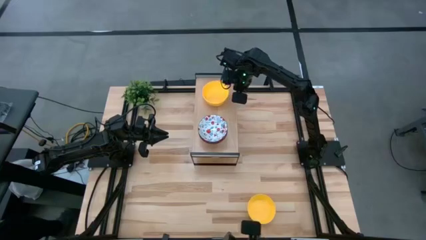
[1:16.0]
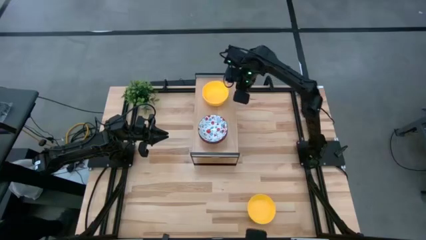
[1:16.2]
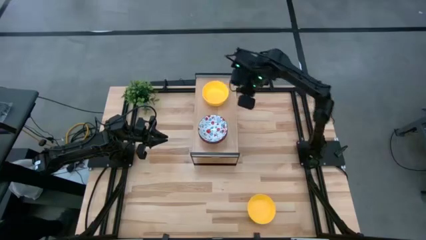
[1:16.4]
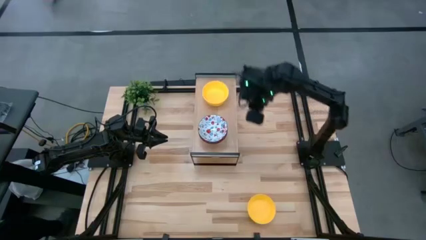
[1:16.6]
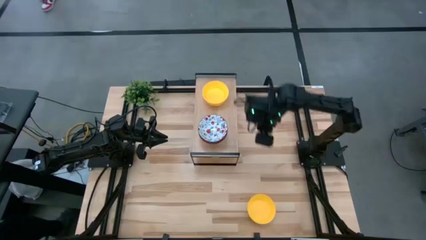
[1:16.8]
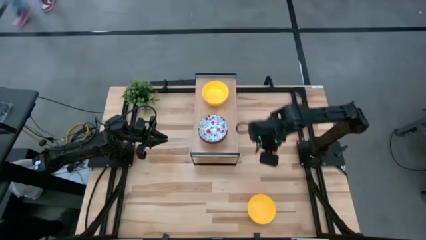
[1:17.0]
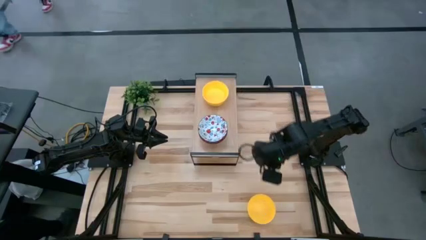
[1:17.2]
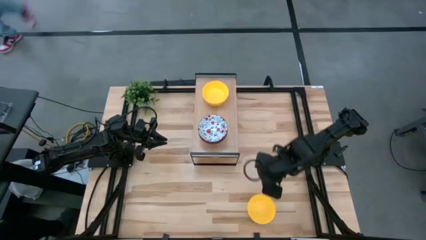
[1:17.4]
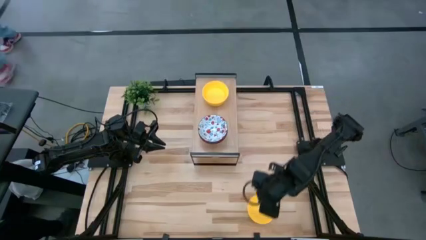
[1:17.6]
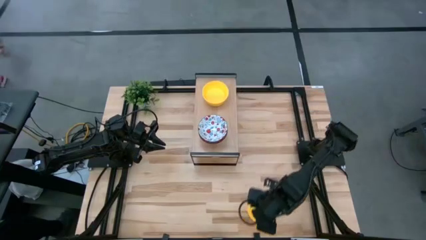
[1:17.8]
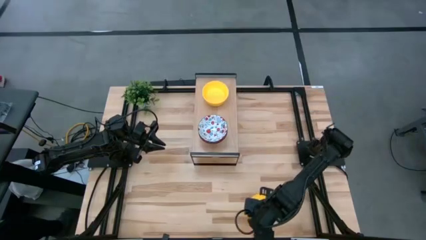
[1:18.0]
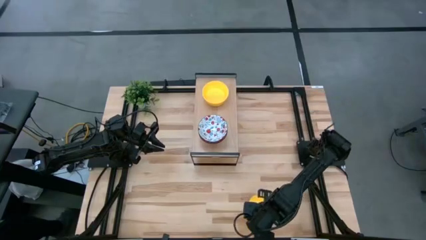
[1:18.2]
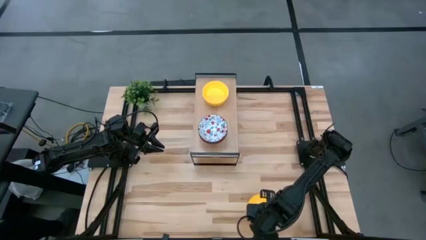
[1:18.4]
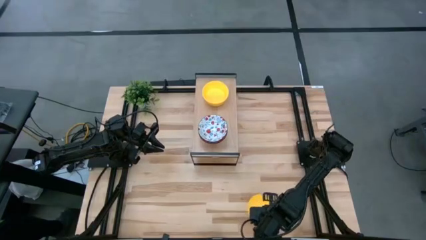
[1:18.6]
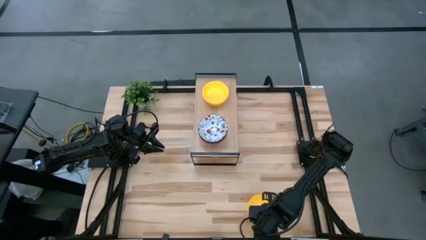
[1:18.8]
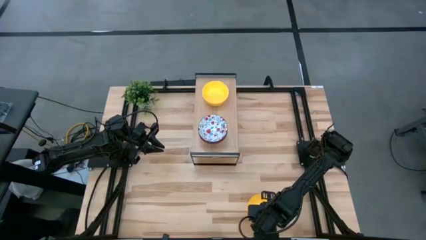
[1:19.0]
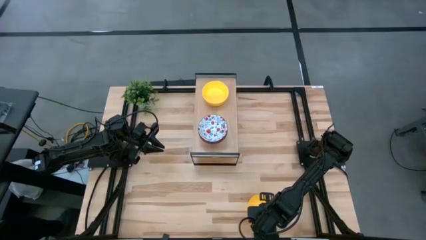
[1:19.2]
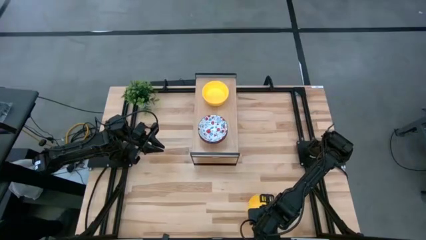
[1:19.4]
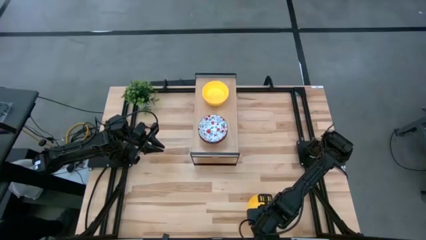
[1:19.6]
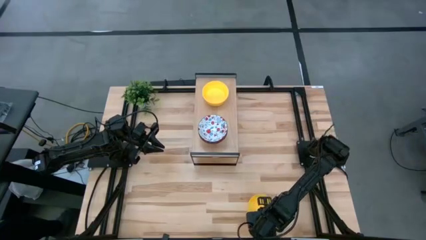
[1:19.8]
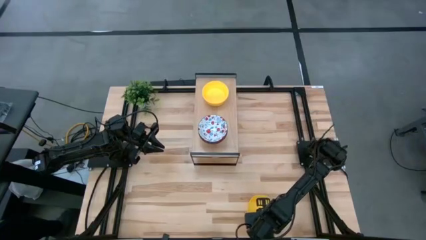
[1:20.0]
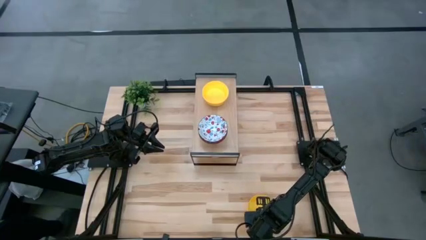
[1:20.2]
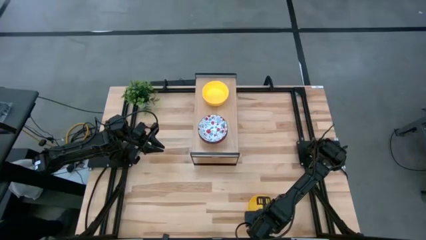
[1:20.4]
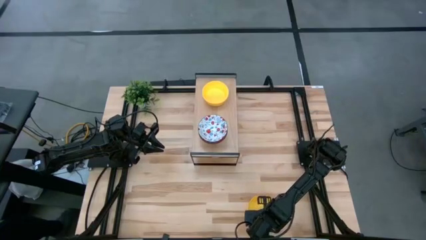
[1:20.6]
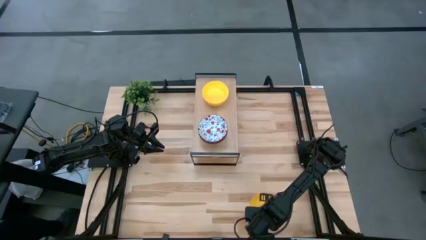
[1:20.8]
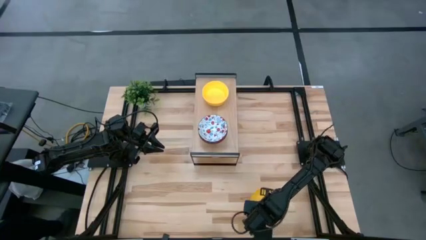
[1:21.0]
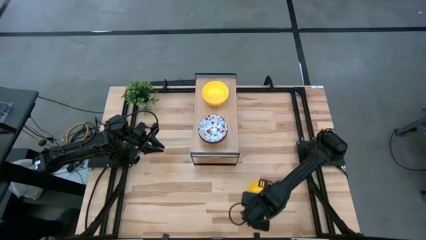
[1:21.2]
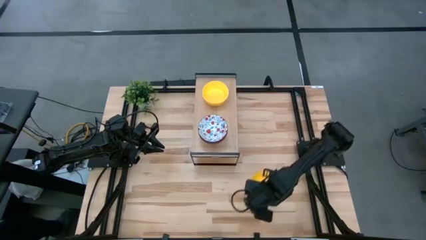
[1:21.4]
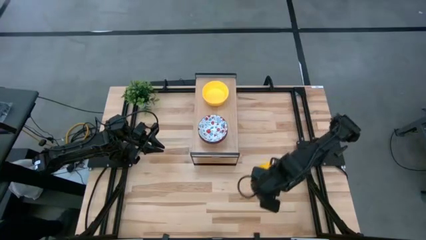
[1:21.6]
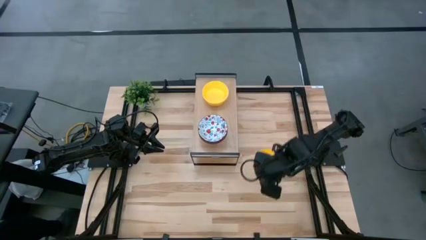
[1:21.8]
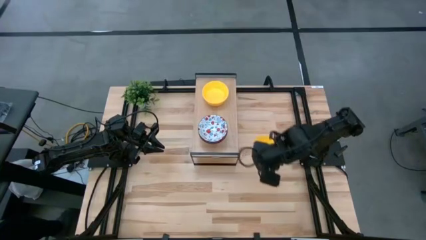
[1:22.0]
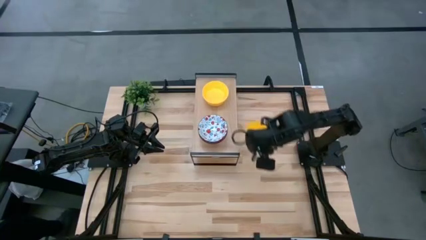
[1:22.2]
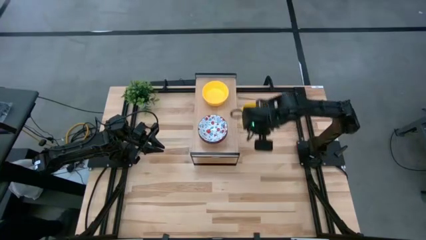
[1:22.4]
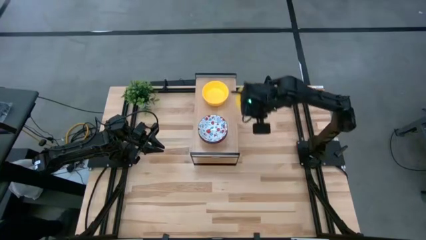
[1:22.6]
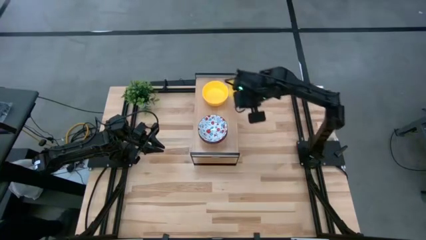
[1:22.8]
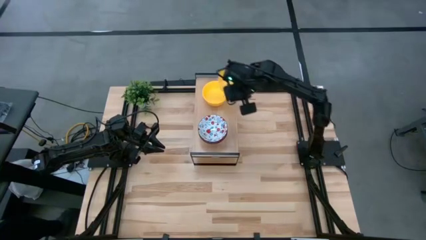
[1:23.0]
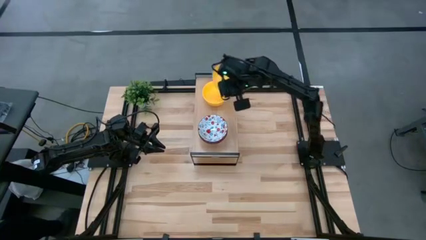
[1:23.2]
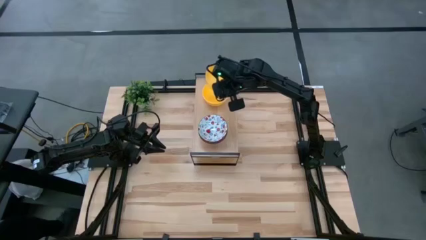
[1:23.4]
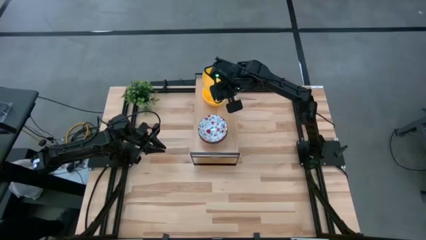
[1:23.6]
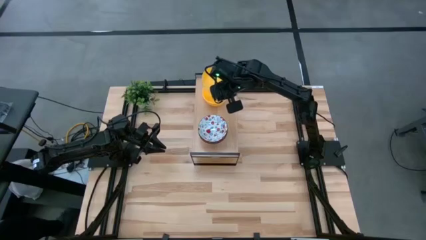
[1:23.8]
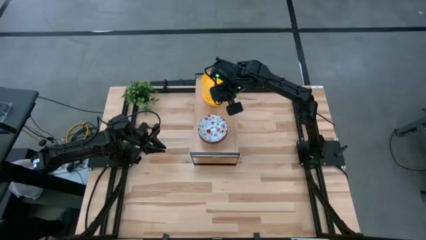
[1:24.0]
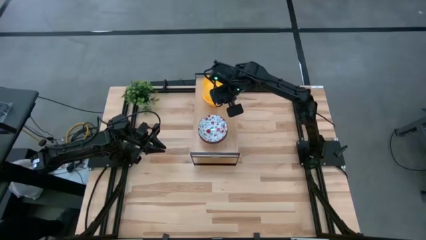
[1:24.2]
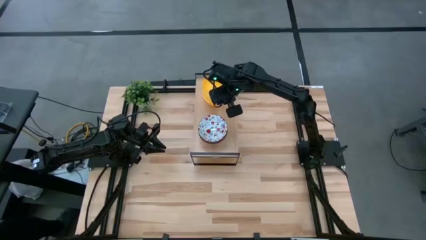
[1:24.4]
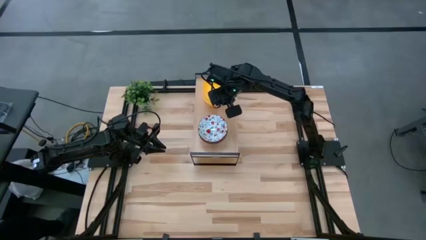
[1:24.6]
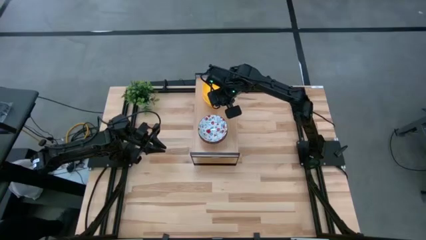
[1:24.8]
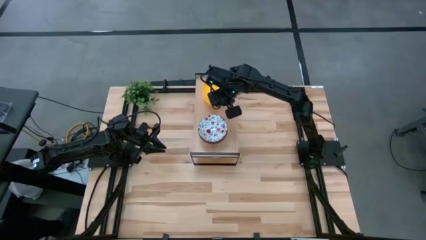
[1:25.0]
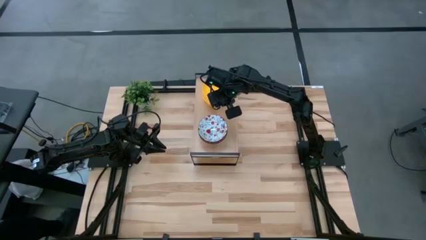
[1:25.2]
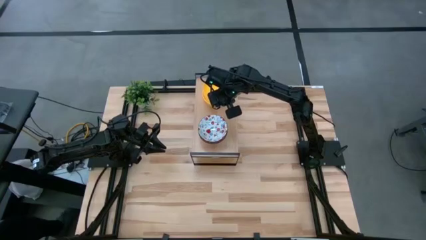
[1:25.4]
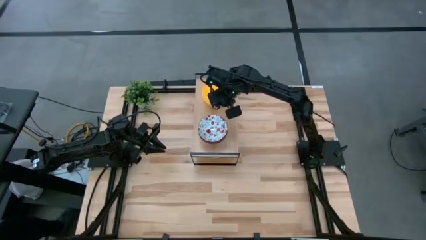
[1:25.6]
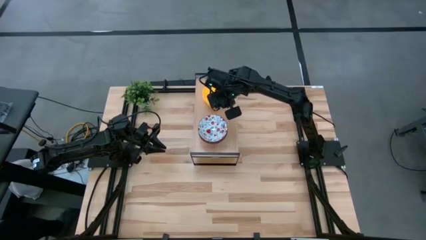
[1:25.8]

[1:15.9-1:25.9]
Task: Pick & Place Mini bowls
Stack the yellow bowl on the yellow bowls on the shelf

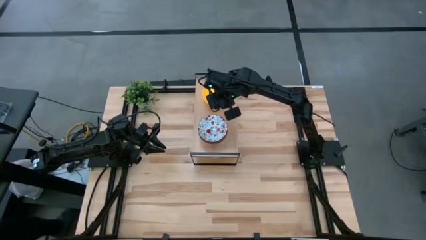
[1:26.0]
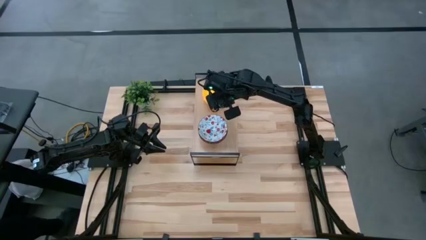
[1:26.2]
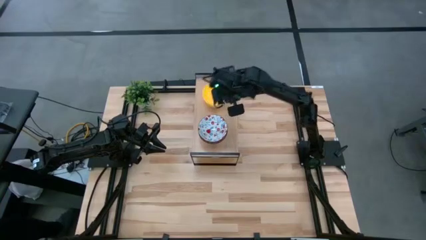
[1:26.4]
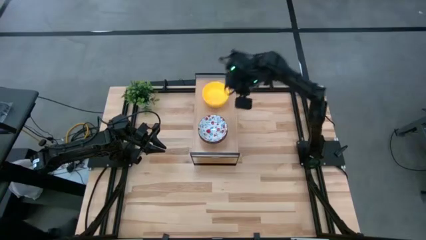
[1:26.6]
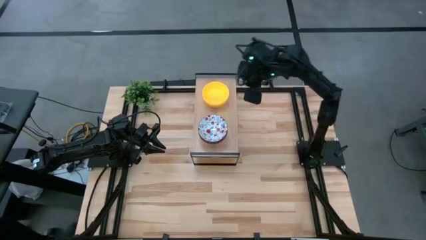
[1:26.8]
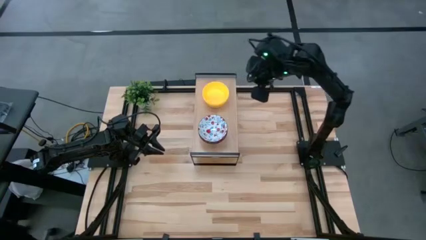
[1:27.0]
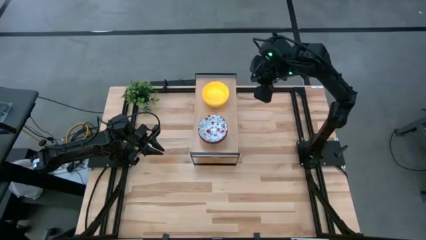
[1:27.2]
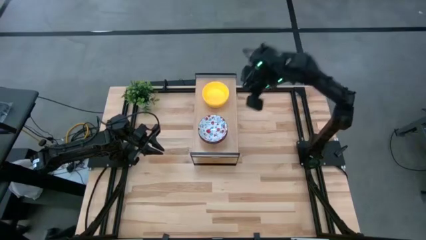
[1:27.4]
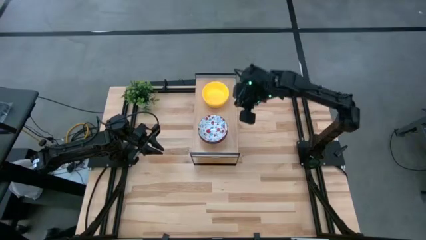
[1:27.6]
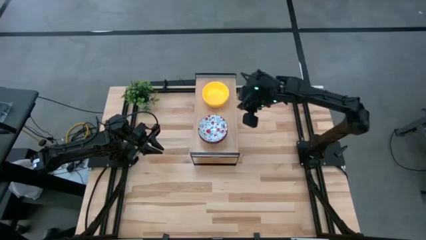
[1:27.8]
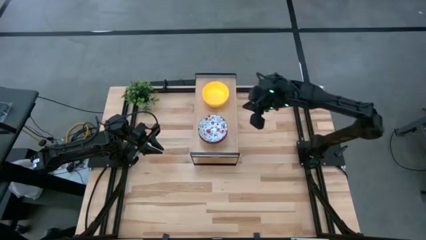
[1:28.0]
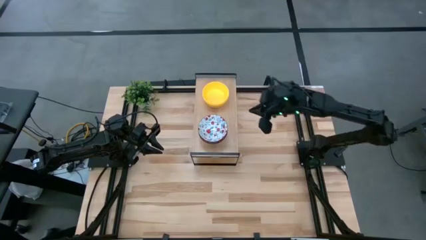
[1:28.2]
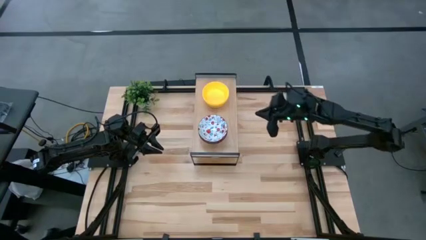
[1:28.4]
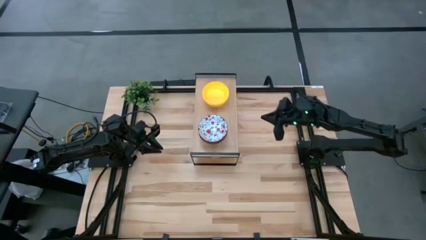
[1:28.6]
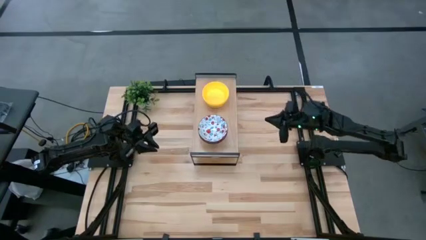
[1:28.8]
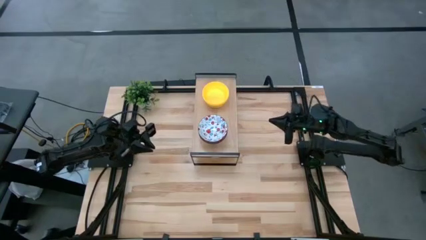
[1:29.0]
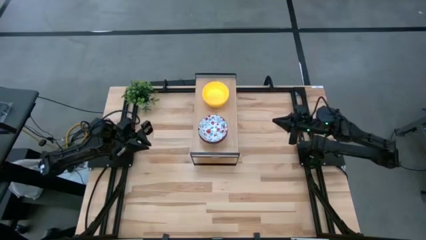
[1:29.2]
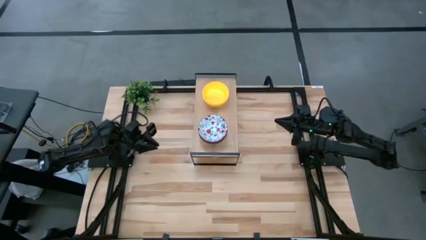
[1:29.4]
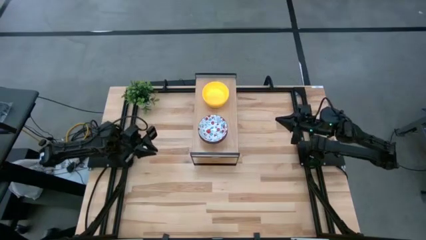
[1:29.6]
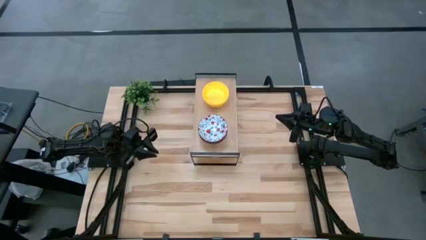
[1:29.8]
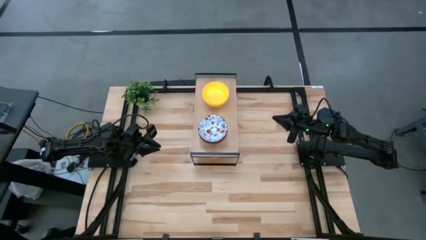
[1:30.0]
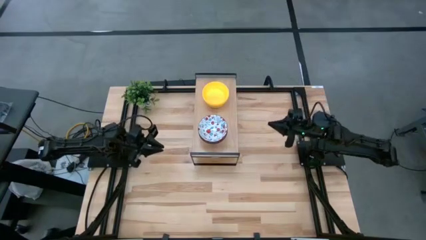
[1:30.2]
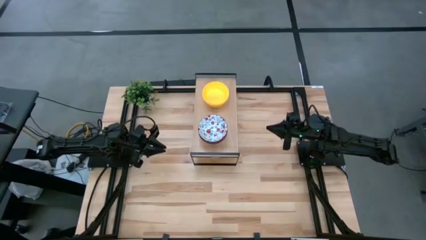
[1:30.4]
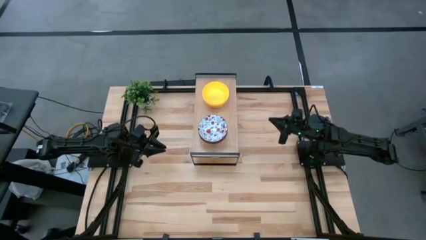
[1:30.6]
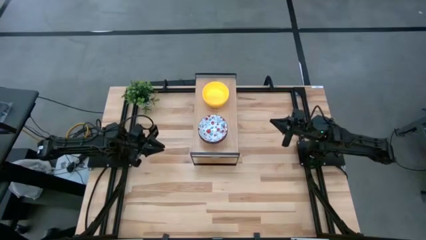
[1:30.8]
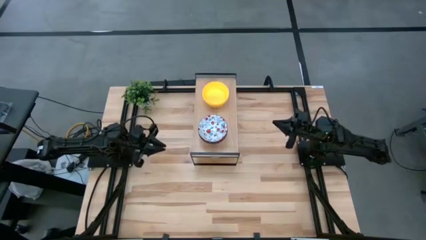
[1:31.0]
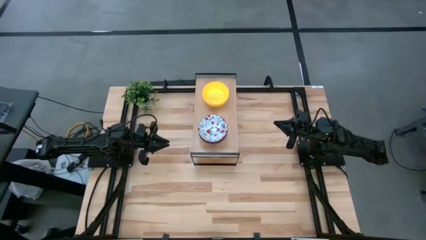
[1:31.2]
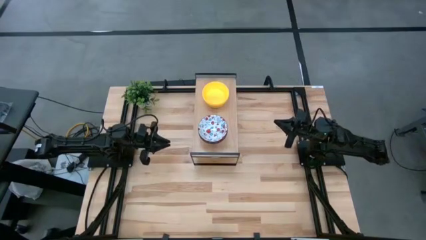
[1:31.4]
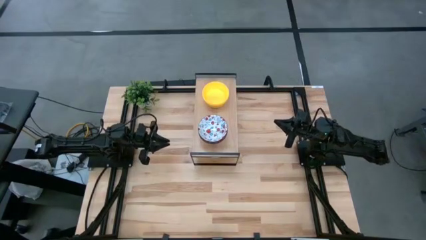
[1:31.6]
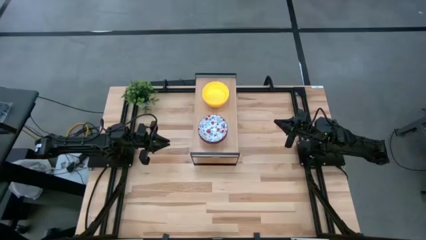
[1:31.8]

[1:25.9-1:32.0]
Return to Home Position
